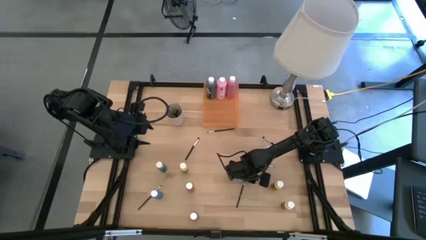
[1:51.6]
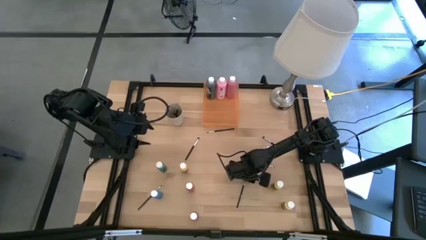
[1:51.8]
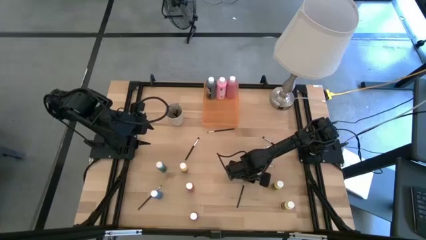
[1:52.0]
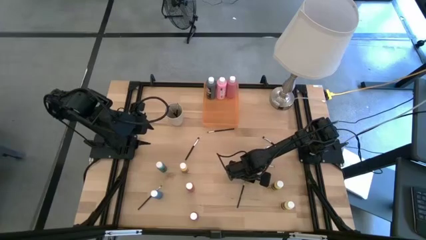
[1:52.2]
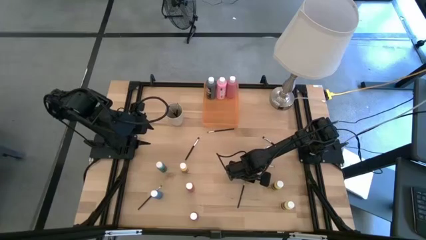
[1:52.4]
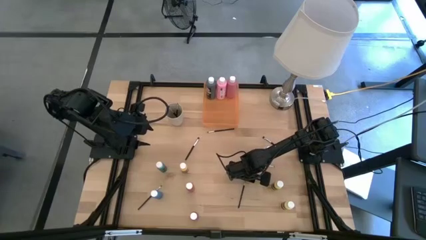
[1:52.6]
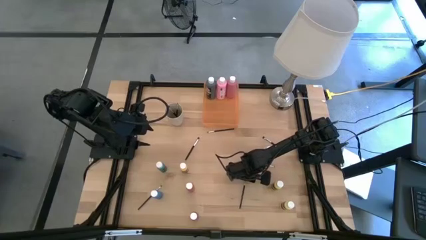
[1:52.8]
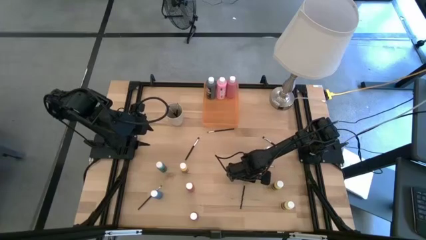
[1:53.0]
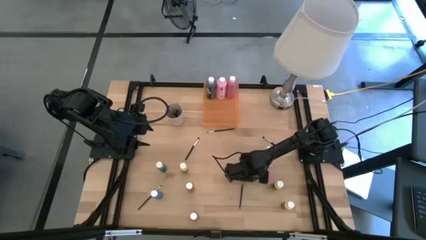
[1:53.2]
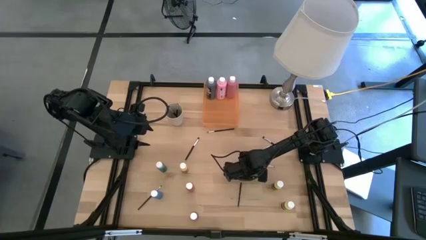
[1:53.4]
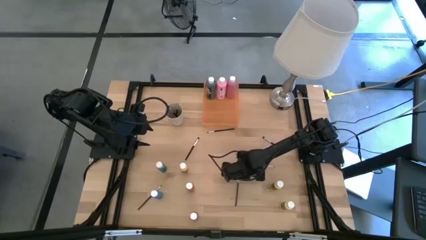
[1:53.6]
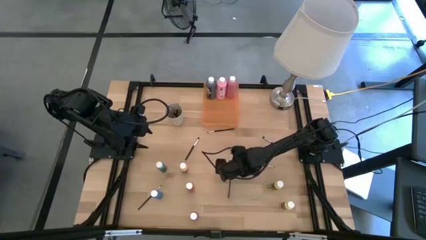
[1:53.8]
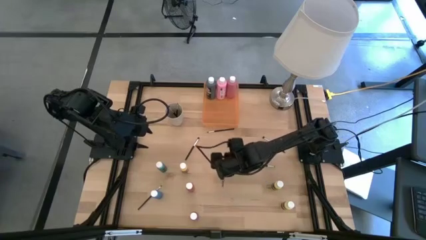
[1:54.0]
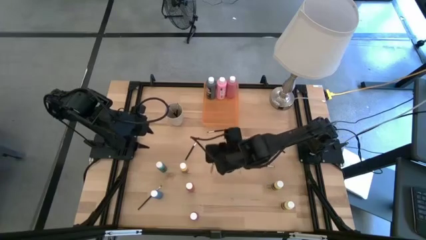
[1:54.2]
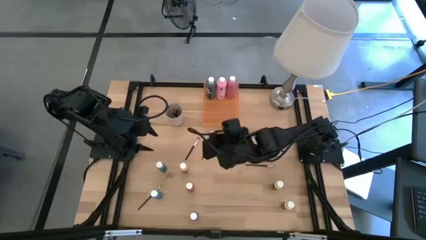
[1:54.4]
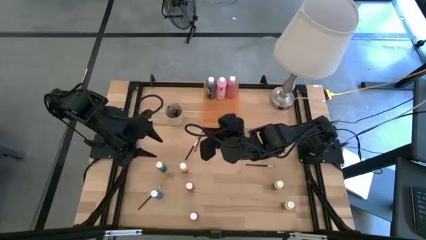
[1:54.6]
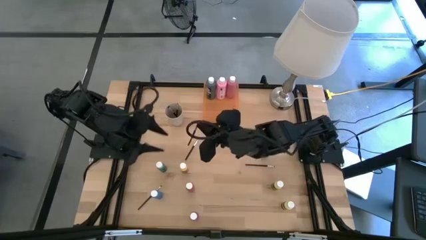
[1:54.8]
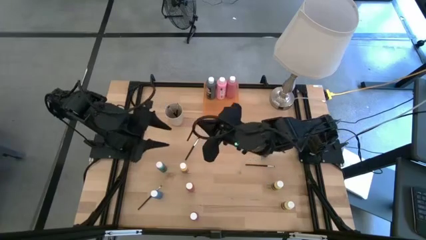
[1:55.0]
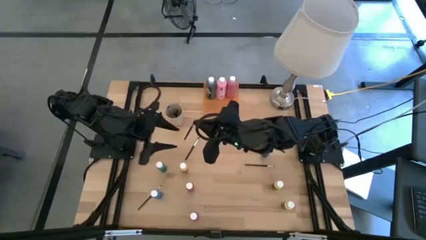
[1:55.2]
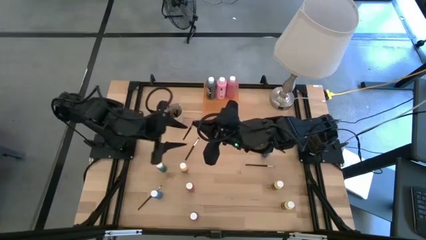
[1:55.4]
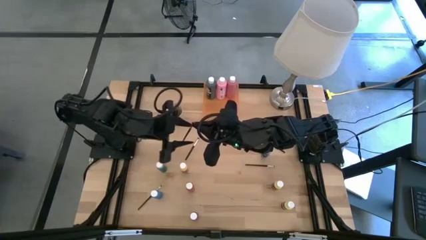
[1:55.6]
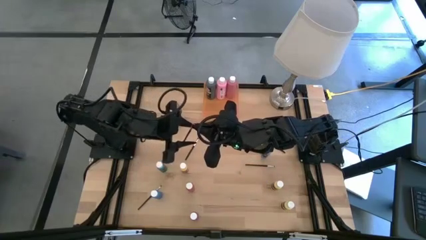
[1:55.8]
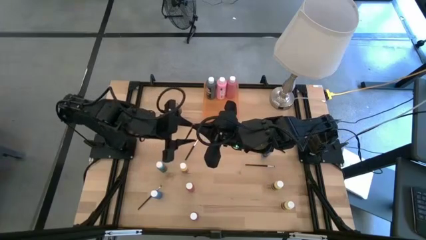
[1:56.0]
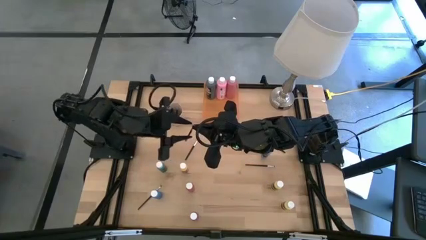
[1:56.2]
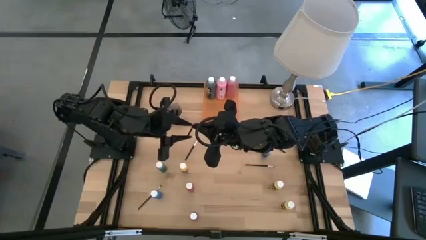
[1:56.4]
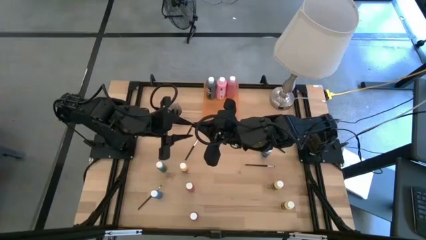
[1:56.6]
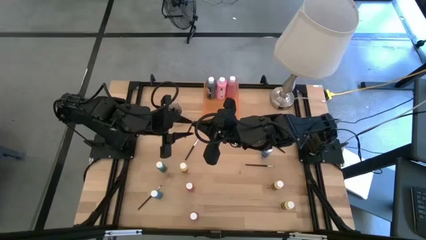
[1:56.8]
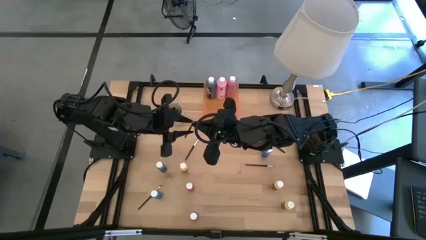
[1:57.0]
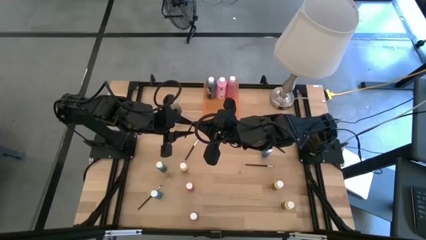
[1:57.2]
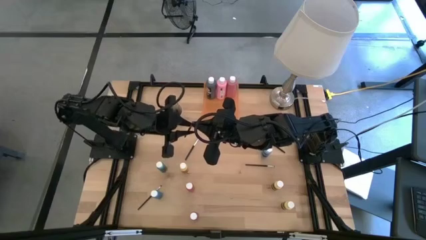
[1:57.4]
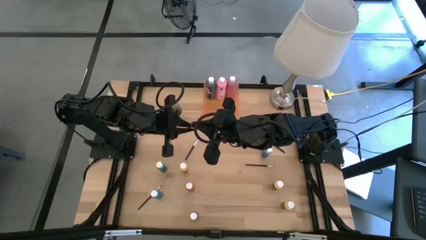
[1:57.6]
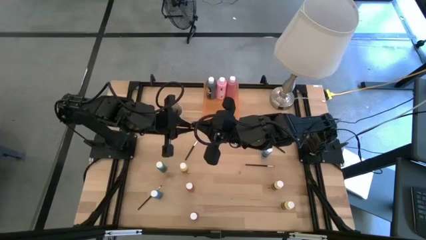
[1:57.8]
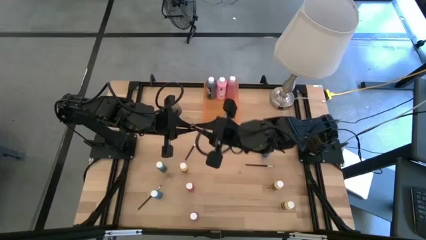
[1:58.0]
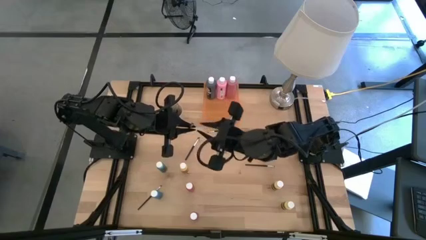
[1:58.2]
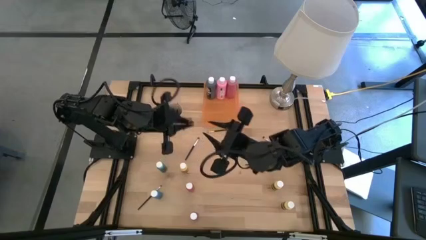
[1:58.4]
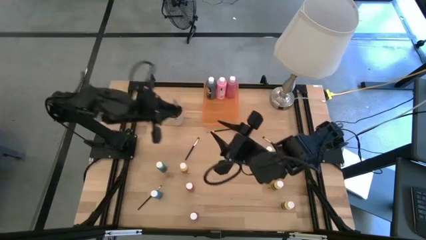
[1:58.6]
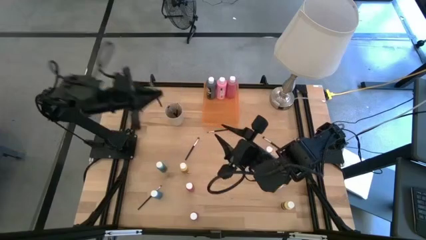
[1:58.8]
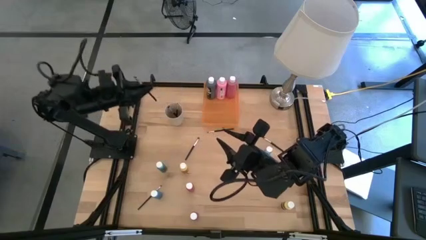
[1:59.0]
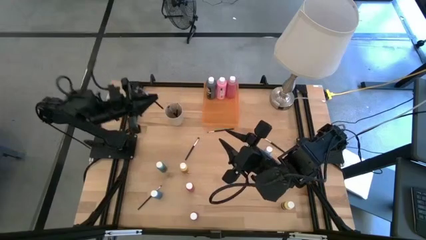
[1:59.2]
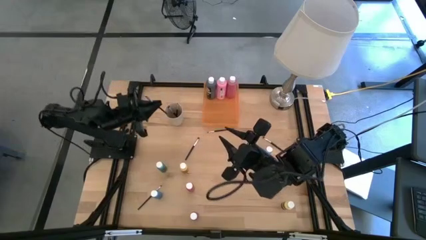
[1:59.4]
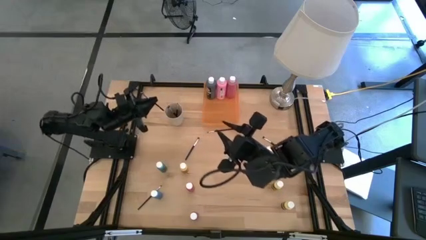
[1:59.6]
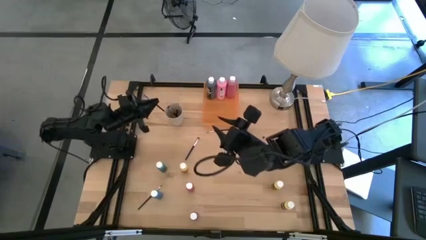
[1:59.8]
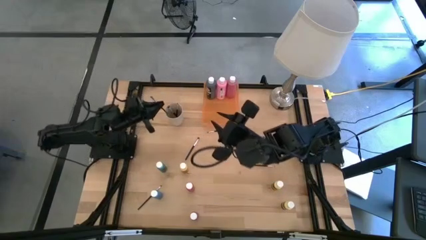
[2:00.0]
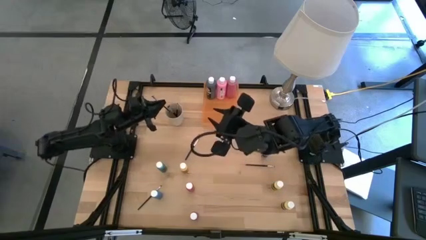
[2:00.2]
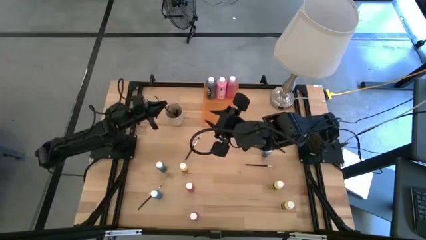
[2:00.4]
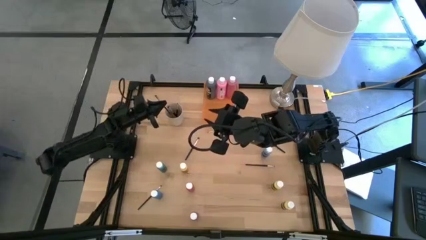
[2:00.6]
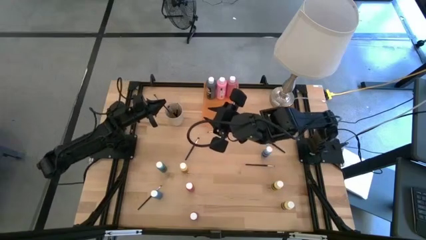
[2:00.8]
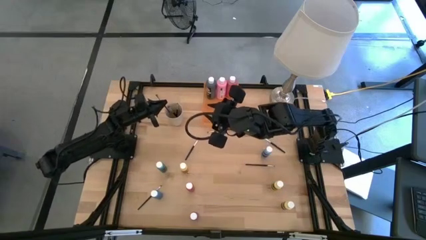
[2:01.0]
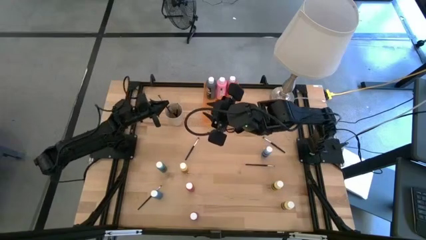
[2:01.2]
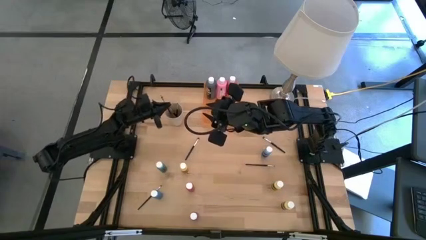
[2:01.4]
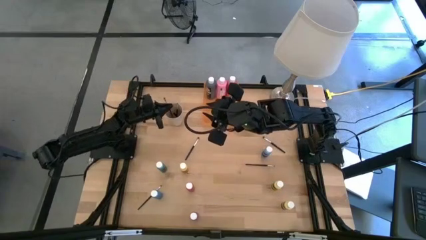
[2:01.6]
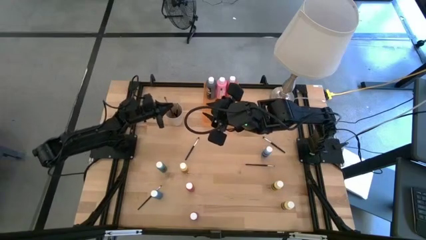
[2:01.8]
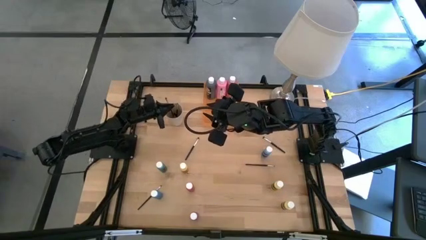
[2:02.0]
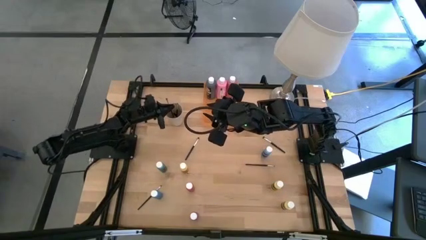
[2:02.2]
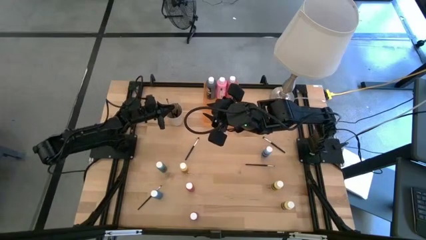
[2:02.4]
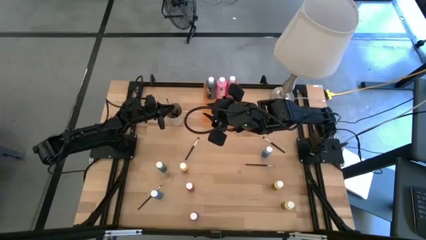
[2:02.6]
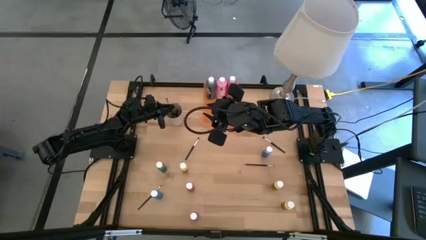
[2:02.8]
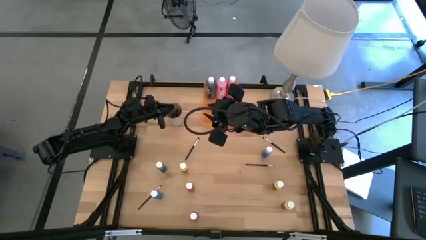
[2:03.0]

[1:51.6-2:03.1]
Task: Pick & Place Paint Supplies
Put the black paint brush into the white cup

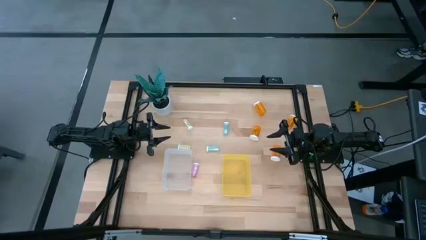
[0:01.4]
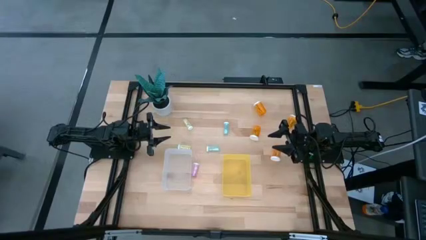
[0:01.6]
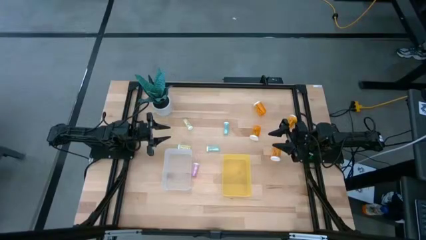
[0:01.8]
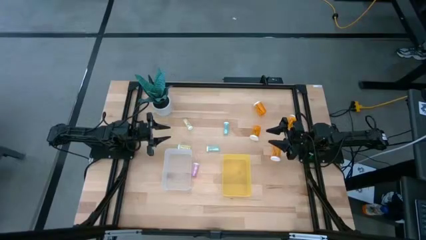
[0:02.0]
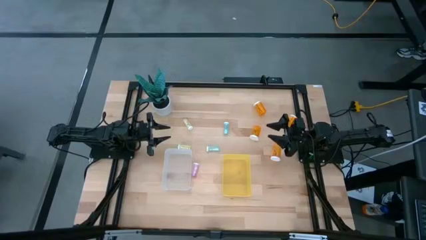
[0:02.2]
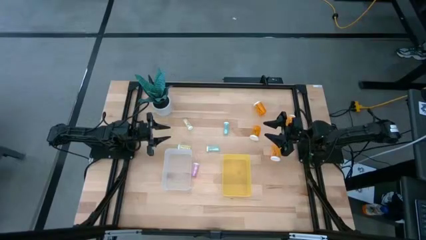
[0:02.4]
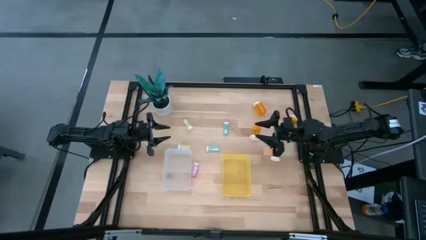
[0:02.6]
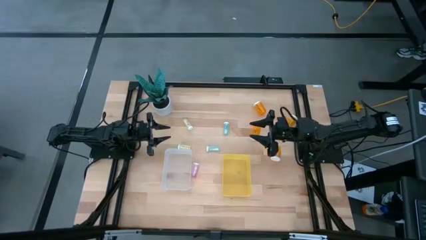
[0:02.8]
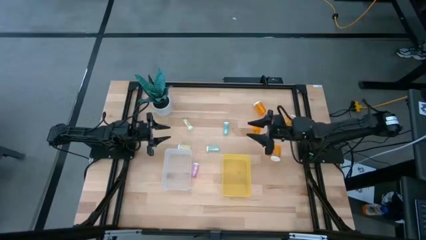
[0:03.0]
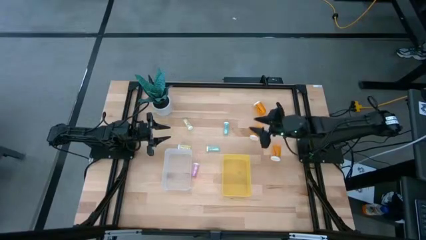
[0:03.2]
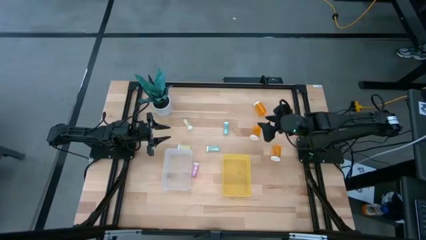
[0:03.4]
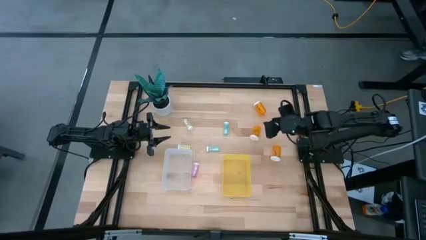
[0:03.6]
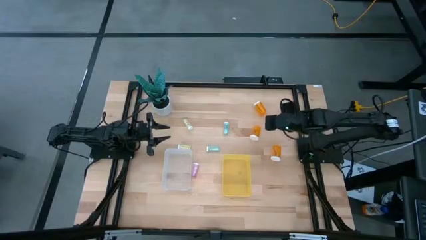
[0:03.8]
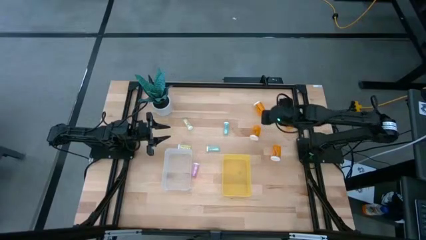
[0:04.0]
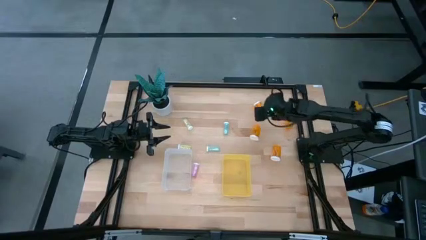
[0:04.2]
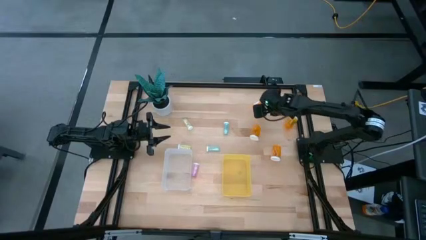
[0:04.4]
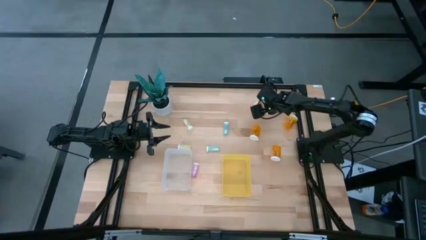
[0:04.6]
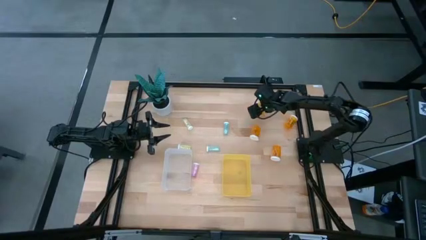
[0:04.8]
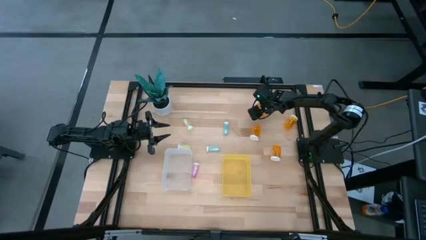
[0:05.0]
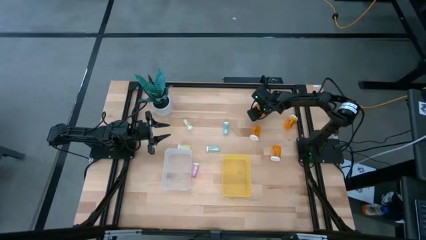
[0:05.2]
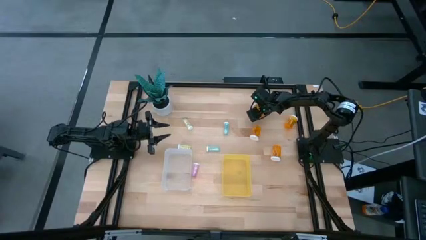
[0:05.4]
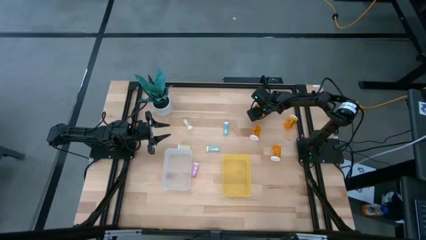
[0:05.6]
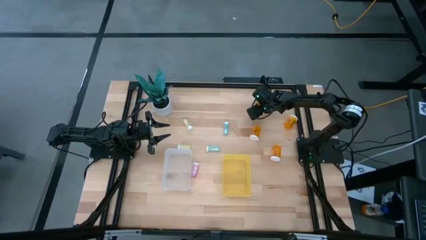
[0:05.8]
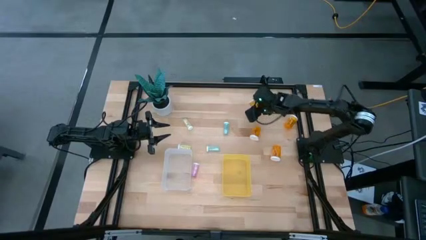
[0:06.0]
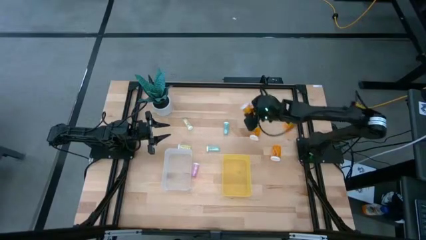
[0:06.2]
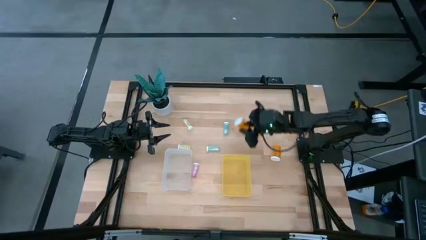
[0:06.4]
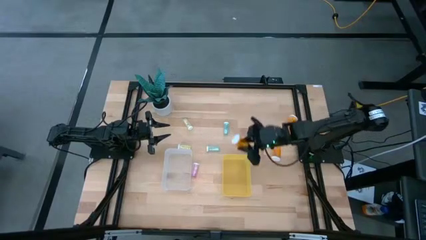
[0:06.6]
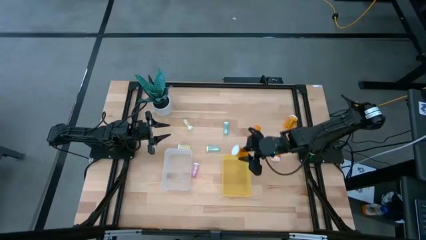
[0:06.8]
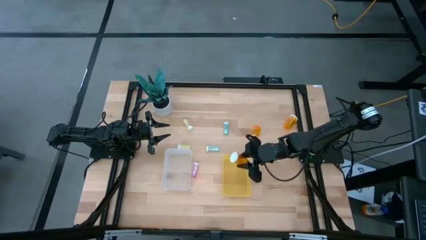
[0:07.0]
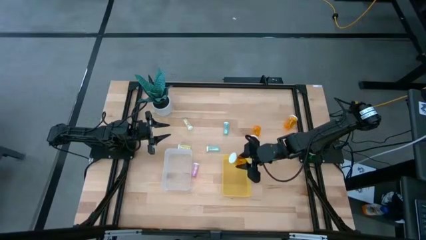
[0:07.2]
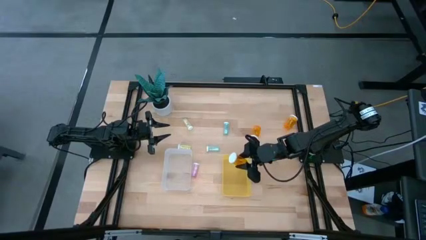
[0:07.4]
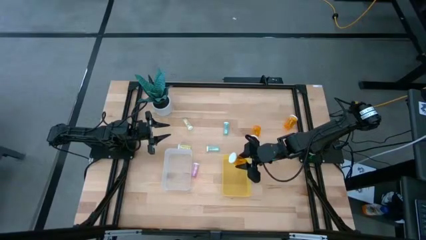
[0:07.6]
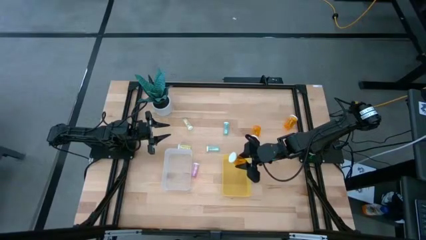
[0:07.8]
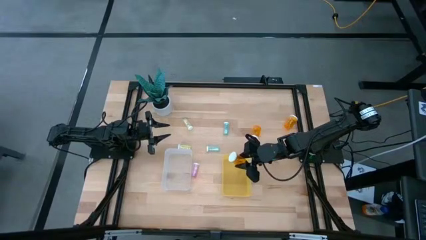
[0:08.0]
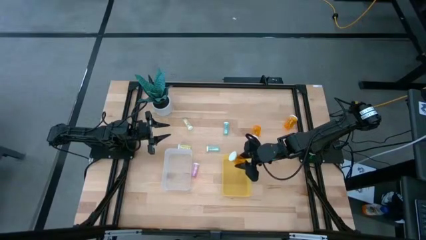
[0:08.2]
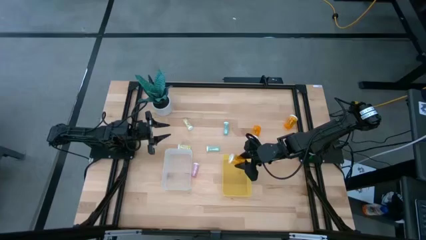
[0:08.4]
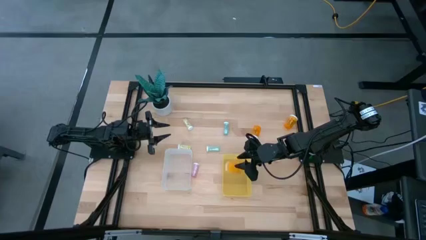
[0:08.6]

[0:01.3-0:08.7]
Task: Pick and place medicine bottles into bin by pill shape (circle, oval)
Put the top middle orange pill bottle into the yellow bin
